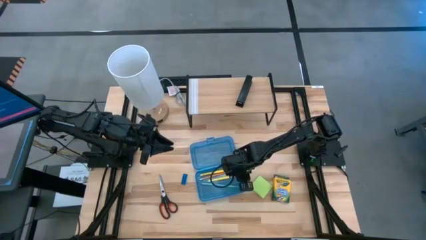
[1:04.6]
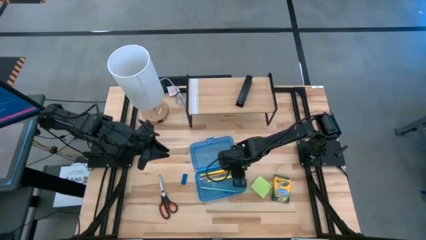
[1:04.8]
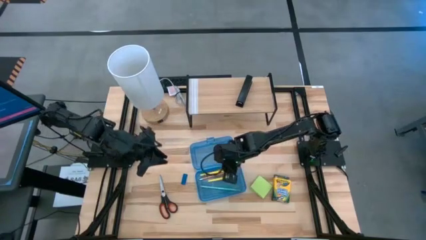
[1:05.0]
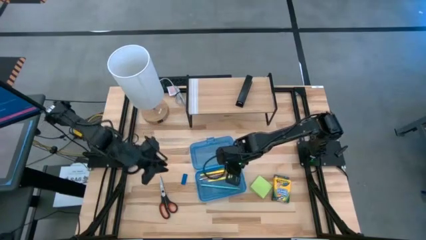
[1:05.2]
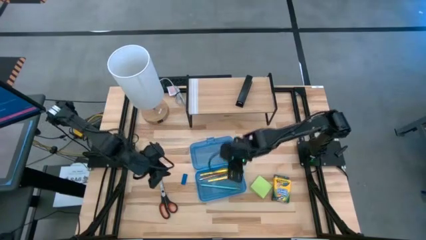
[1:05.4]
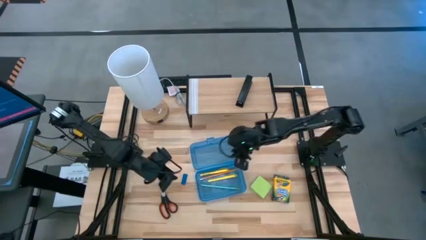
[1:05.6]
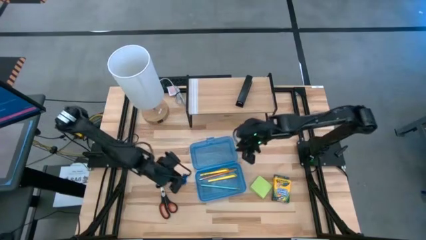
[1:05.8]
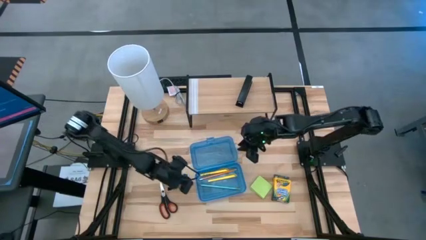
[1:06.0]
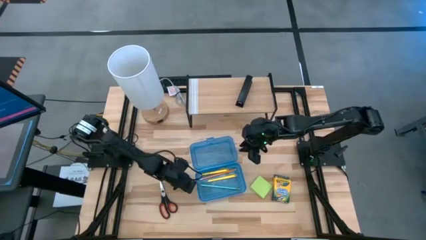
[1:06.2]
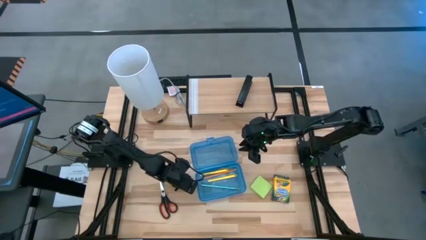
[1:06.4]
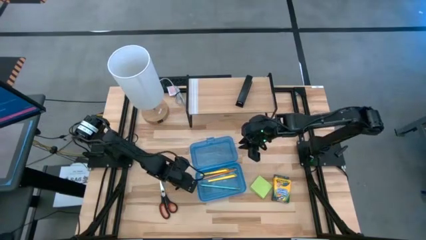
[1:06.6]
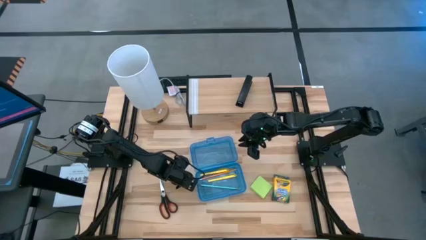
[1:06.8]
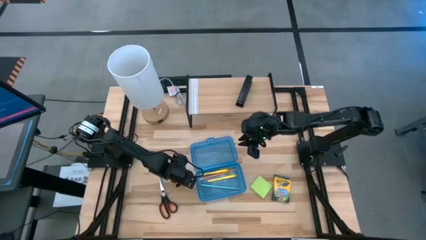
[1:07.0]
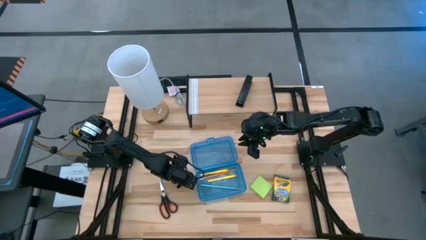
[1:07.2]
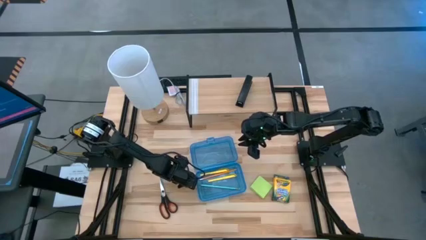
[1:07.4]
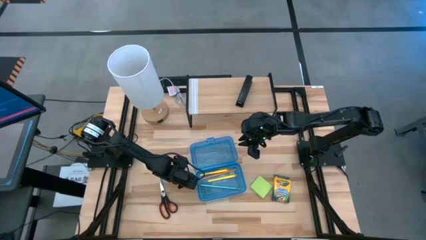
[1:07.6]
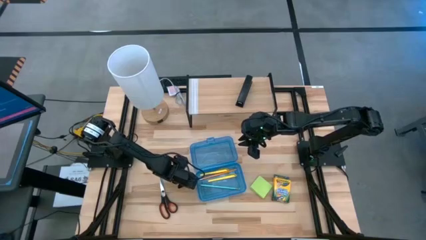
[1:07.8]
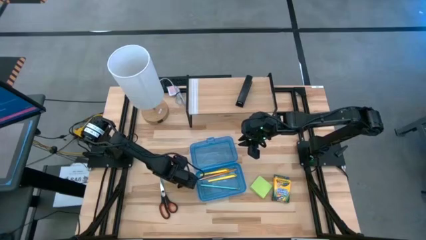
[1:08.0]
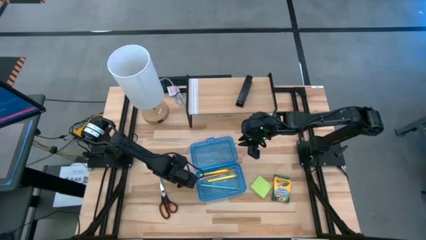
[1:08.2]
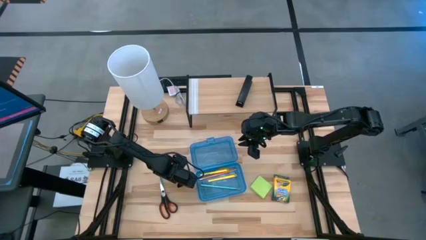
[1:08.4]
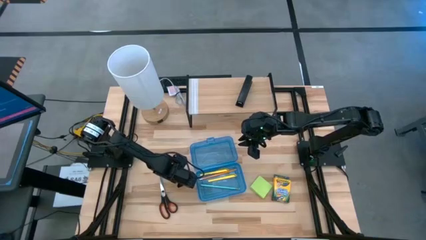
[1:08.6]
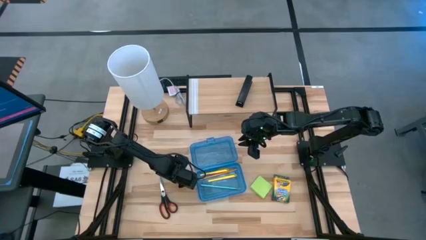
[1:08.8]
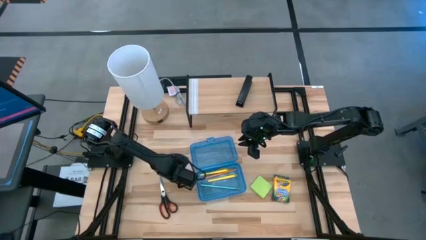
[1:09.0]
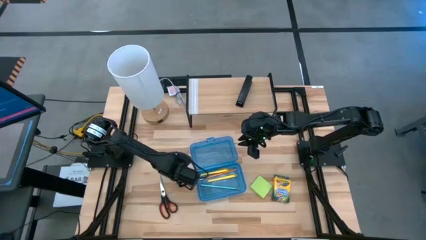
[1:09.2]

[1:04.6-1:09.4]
Task: Pack school essentials
Put the blue eraser into the blue supply box

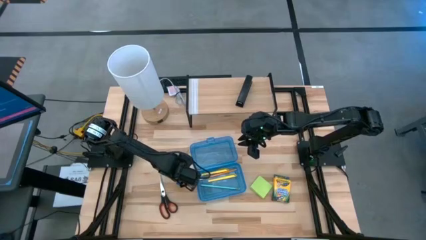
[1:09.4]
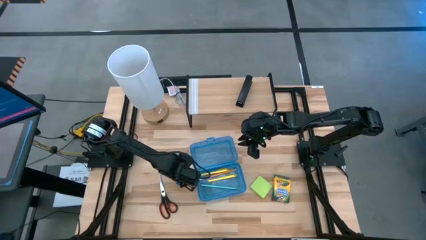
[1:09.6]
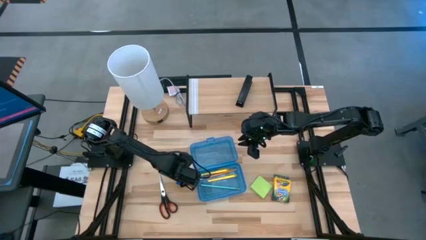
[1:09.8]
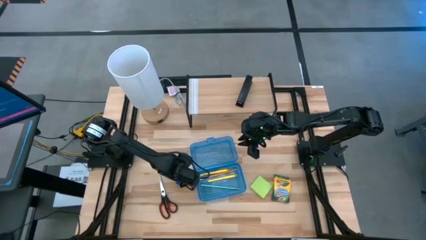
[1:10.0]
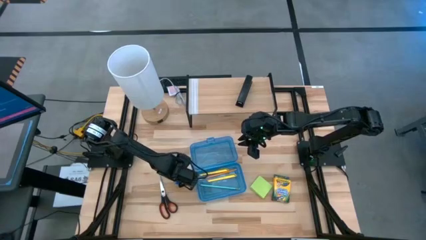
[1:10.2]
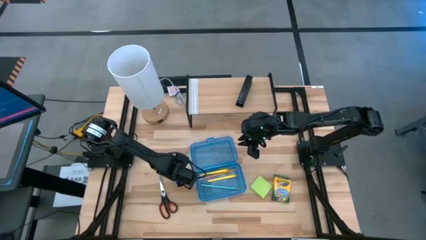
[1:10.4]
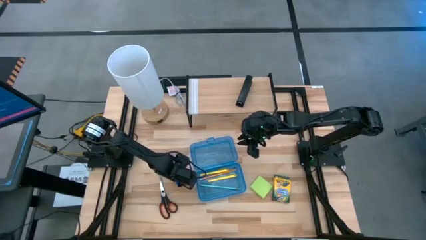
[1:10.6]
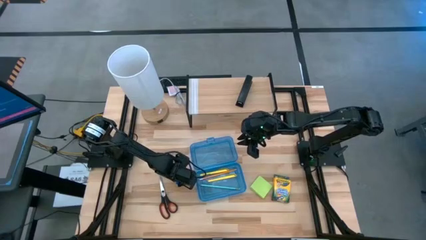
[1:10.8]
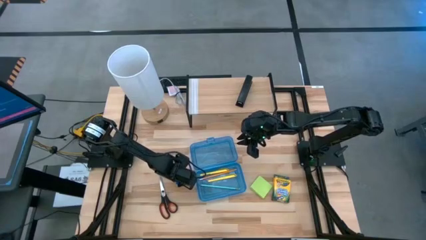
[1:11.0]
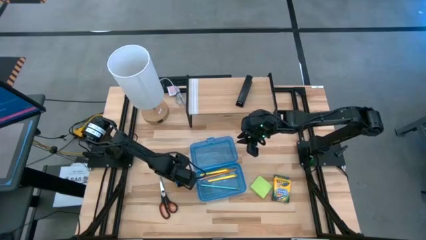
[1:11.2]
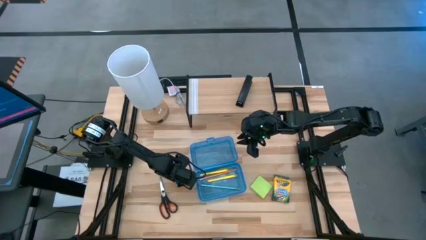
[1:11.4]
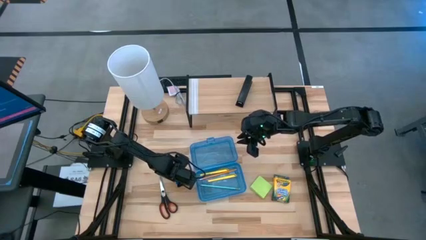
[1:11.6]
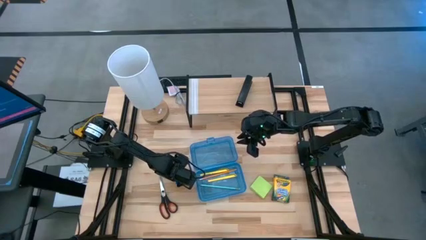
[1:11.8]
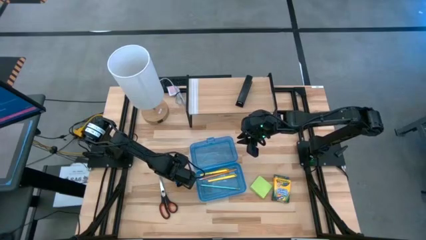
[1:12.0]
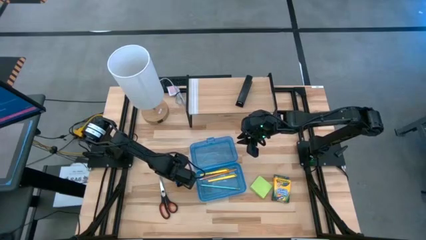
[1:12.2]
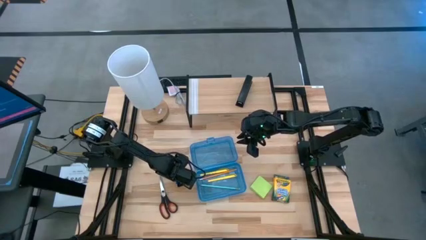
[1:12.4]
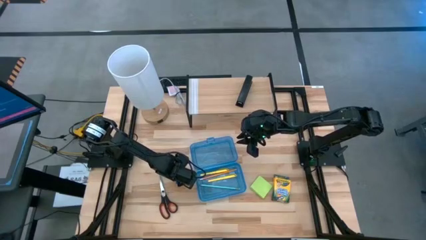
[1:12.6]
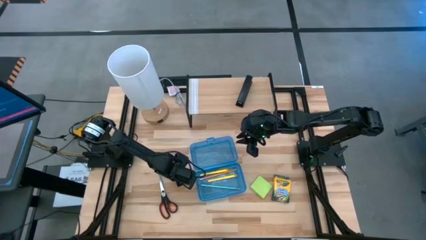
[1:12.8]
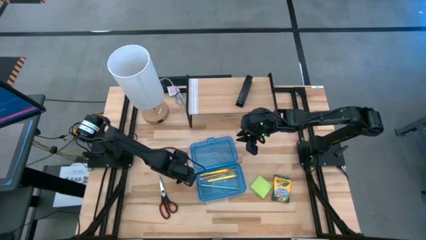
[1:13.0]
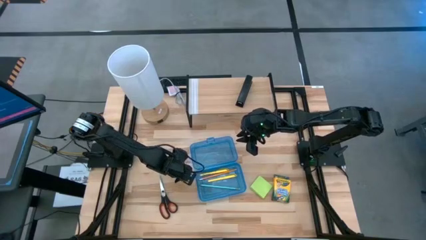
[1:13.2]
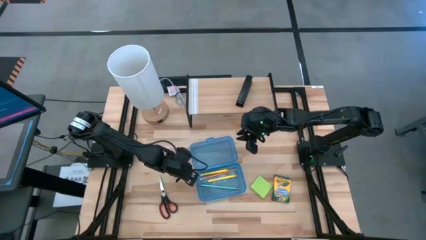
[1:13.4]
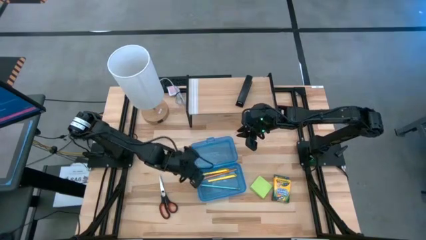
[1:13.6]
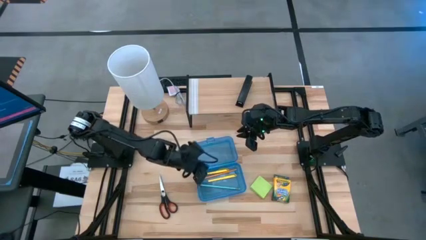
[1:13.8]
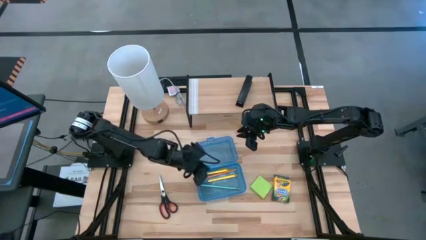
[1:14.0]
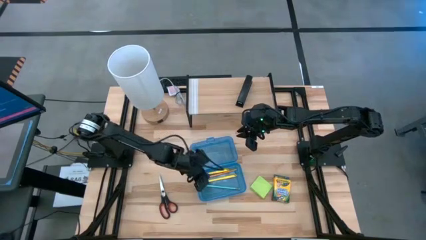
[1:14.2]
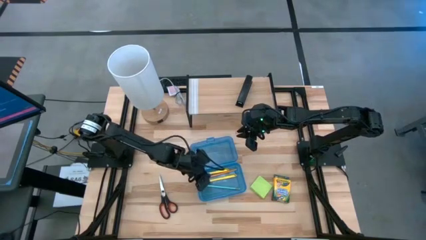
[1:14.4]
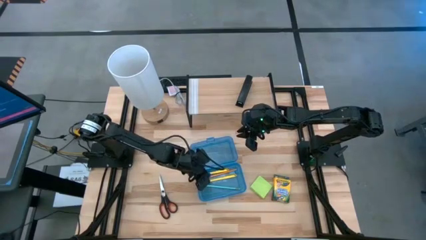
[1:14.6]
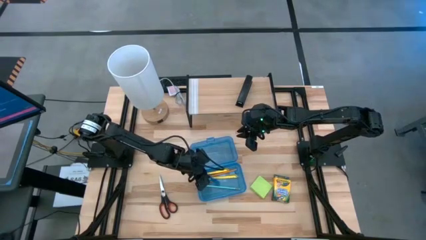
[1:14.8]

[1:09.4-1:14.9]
Put the blue eraser into the blue supply box

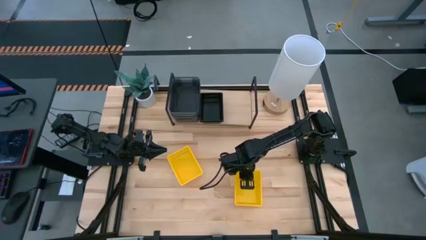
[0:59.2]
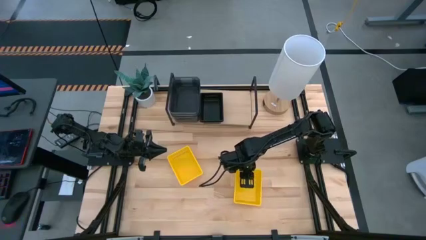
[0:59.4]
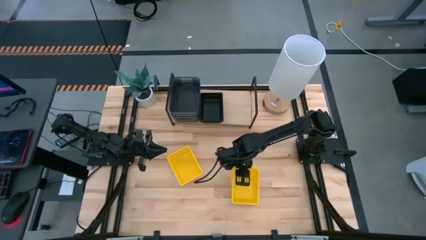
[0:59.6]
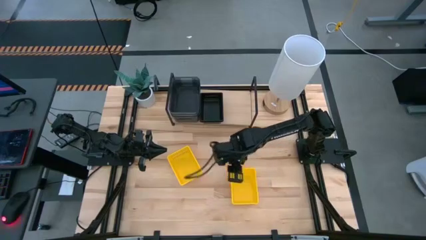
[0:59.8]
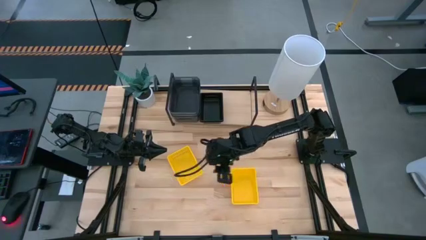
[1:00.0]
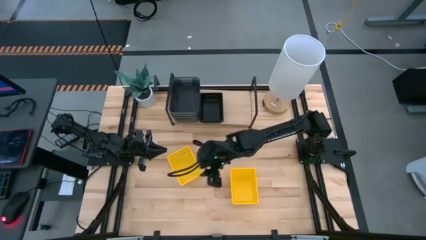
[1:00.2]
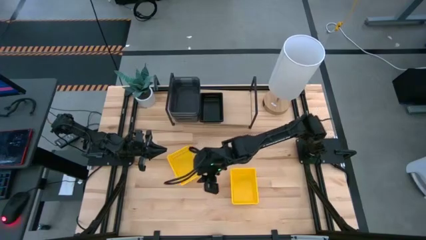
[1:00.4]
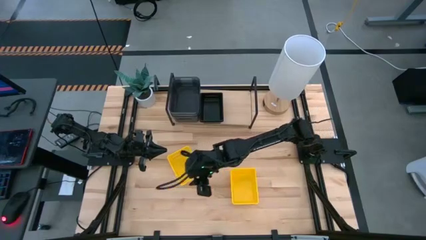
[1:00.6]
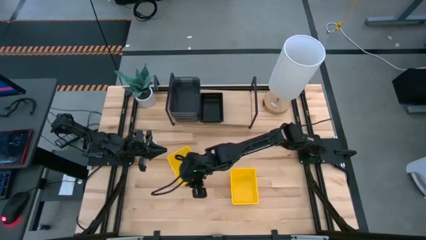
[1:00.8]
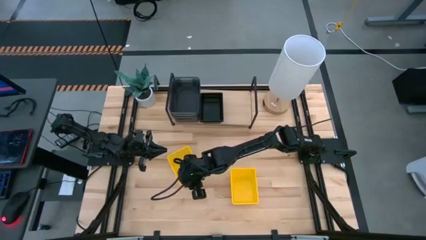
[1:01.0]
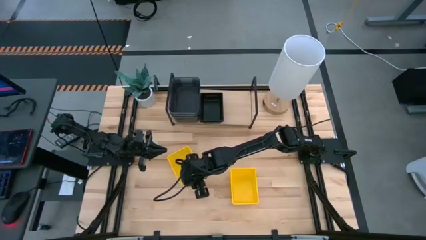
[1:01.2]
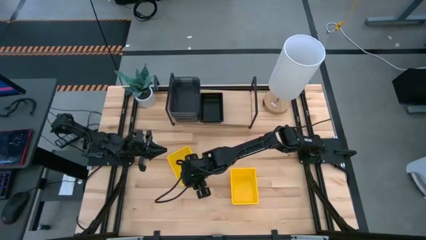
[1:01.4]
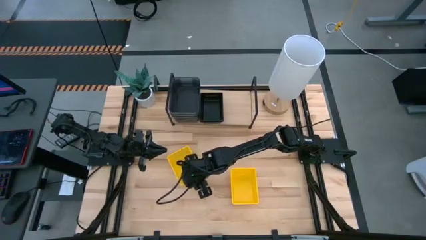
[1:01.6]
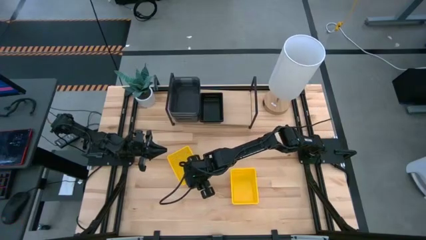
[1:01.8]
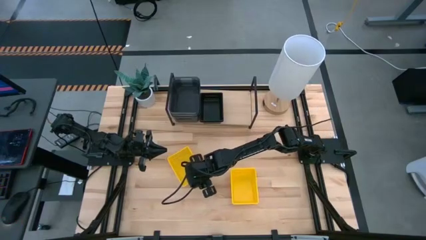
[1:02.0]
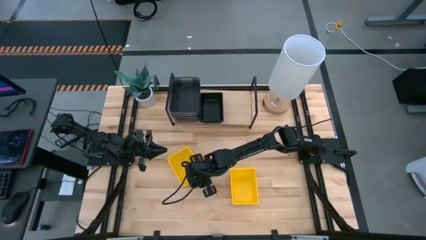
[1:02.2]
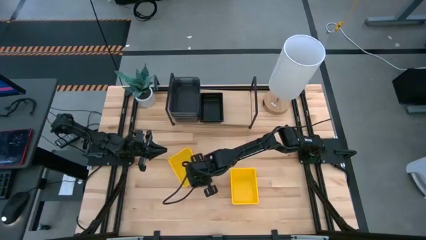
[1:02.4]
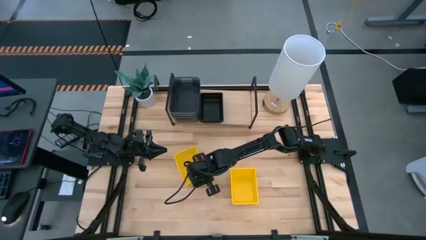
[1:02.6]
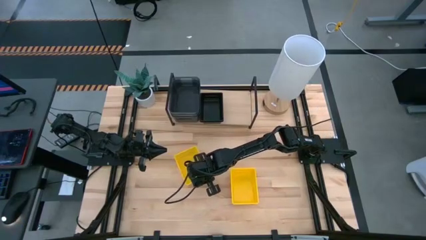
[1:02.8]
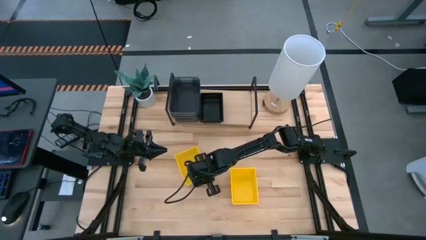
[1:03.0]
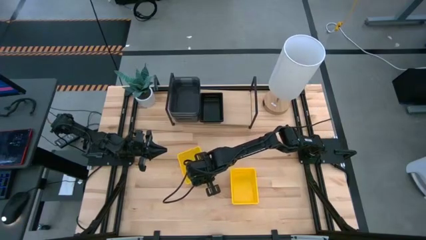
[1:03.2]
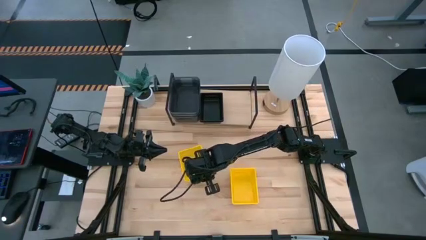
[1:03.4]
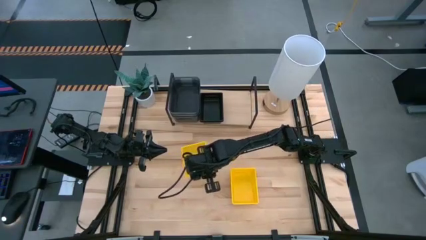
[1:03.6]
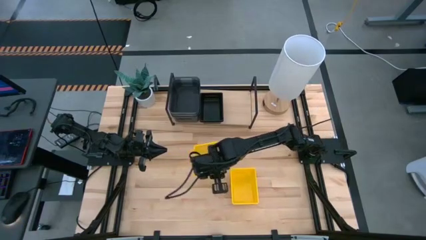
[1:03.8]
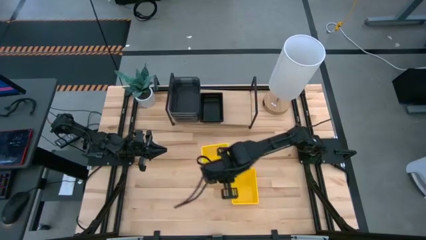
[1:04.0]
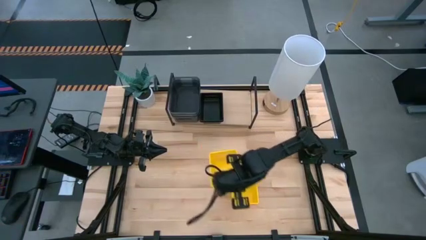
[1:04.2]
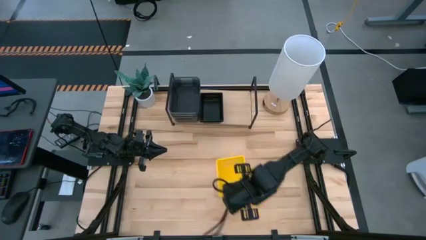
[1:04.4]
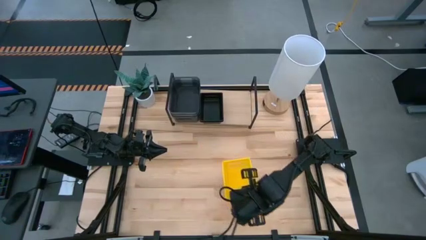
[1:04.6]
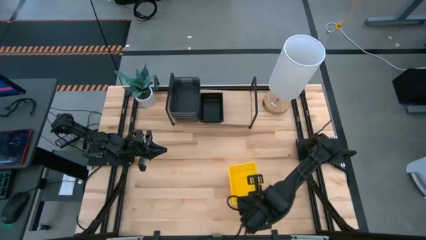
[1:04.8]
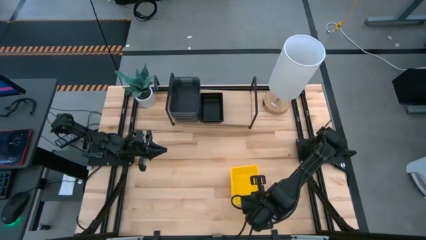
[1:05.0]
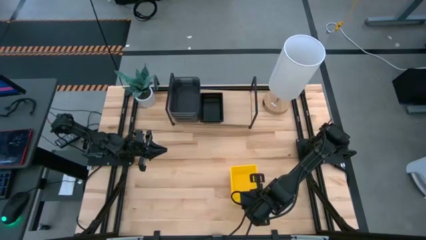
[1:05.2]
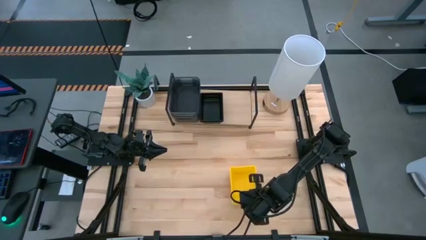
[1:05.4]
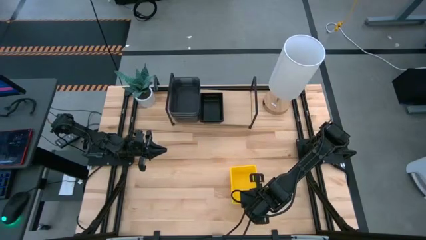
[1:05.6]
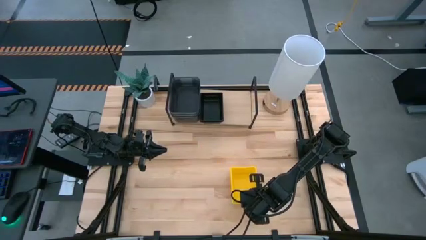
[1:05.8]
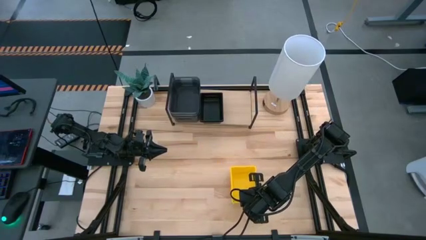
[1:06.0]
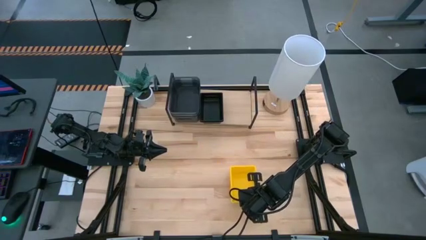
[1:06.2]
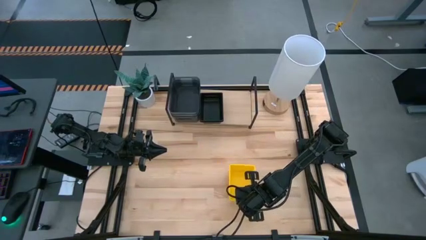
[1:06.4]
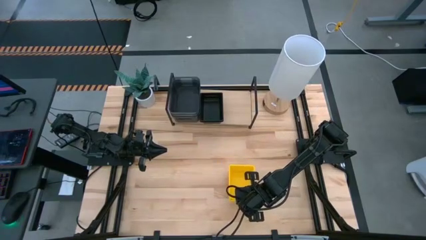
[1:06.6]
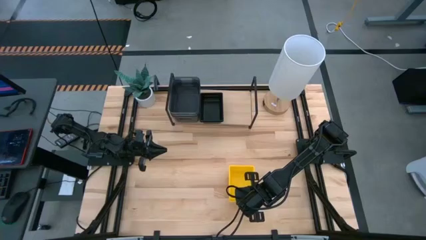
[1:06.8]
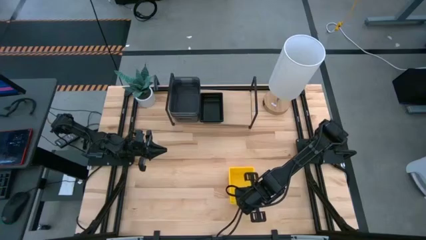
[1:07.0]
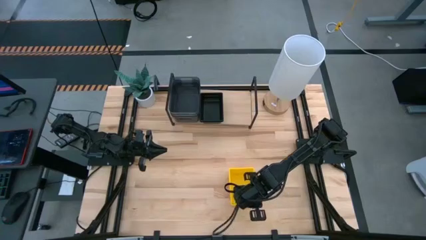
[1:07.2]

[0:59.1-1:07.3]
Task: Stack baskets on shelf by color
Stack the left yellow basket on top of the right yellow basket
